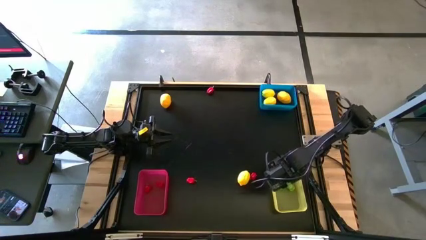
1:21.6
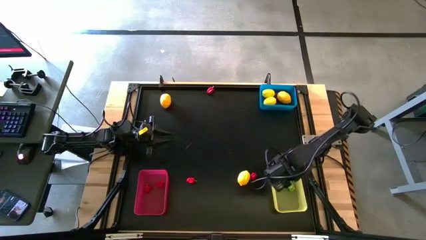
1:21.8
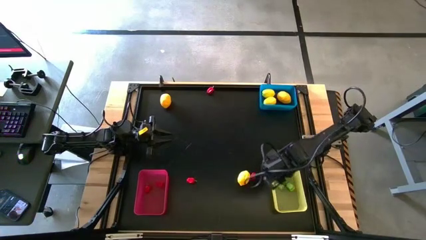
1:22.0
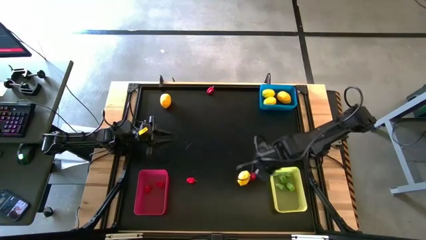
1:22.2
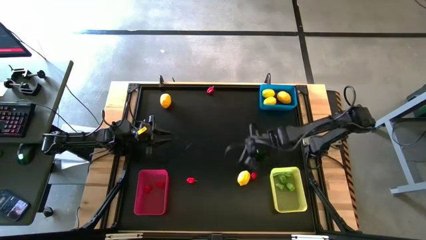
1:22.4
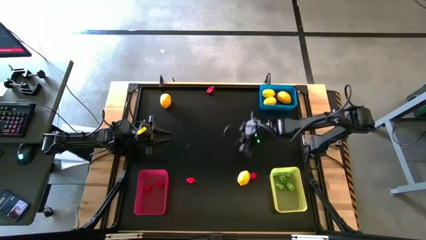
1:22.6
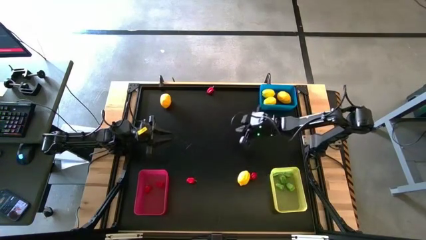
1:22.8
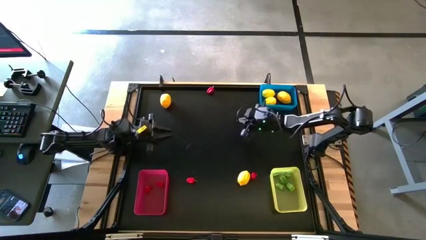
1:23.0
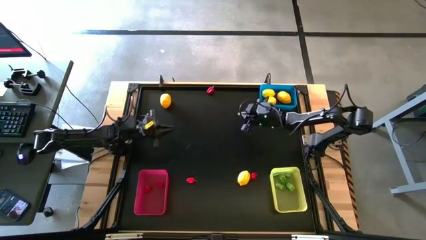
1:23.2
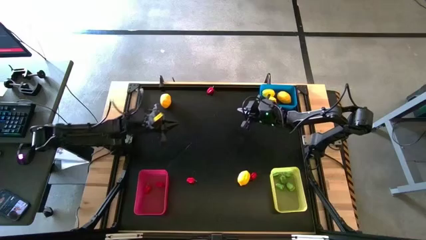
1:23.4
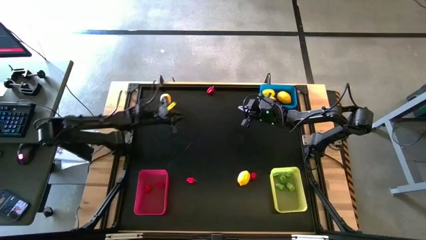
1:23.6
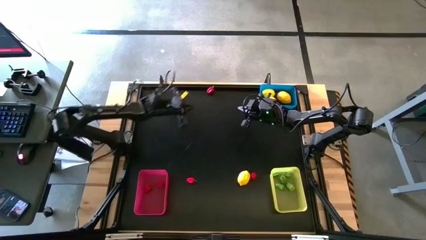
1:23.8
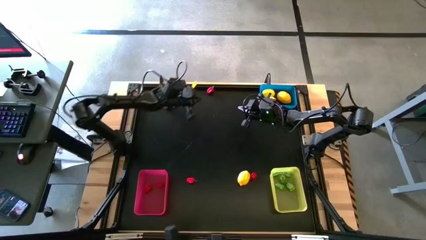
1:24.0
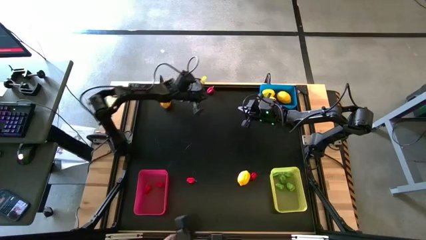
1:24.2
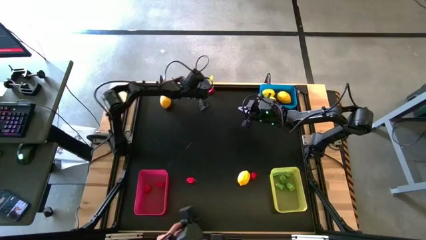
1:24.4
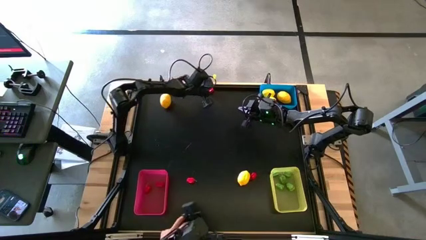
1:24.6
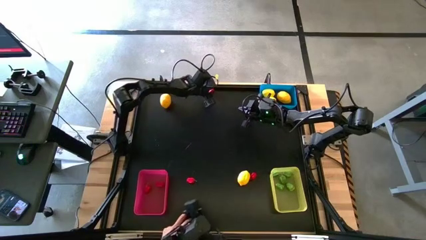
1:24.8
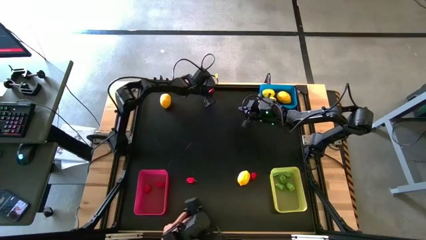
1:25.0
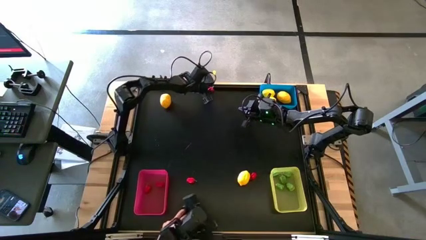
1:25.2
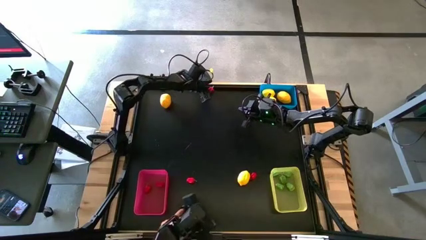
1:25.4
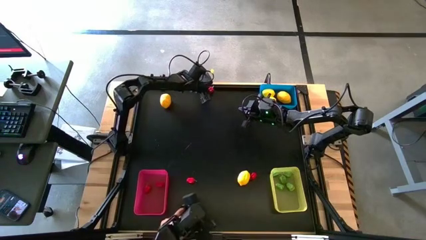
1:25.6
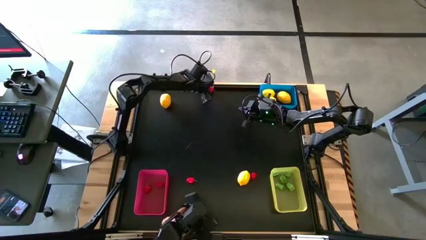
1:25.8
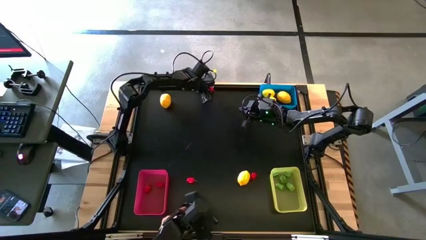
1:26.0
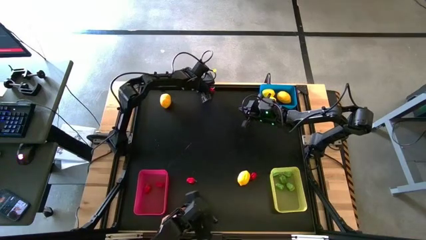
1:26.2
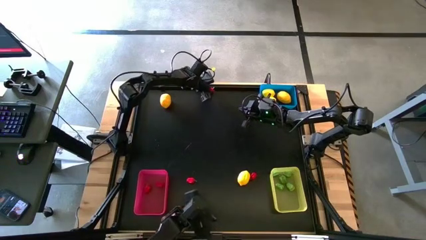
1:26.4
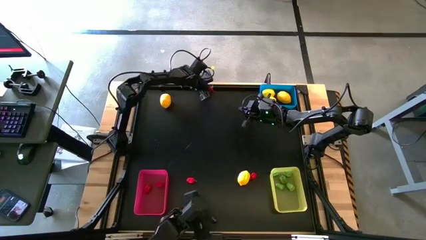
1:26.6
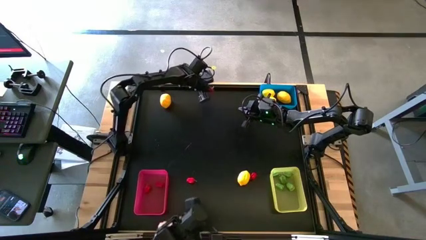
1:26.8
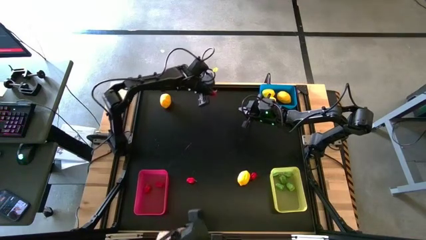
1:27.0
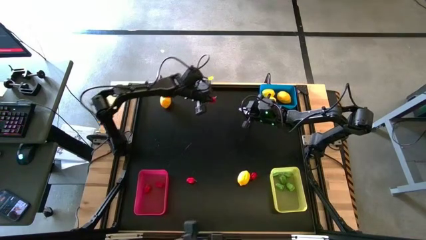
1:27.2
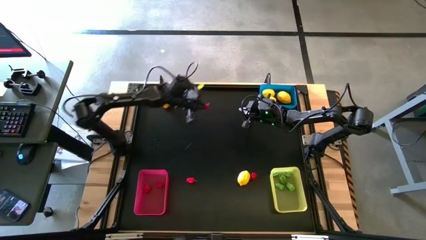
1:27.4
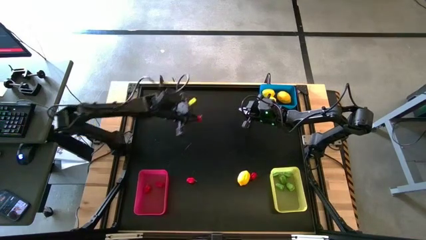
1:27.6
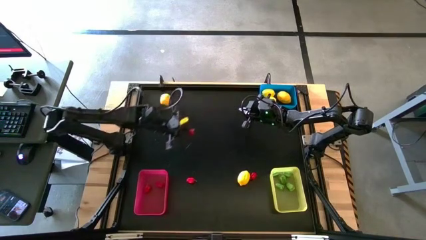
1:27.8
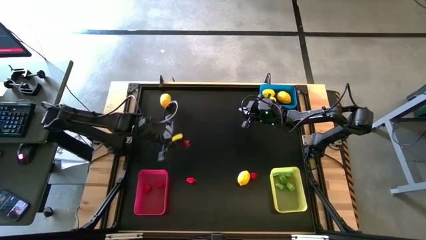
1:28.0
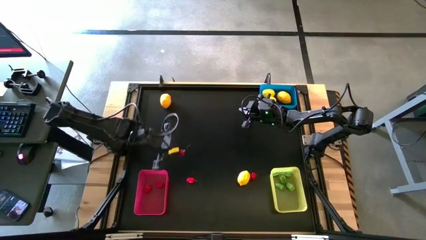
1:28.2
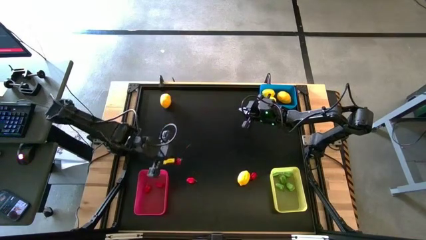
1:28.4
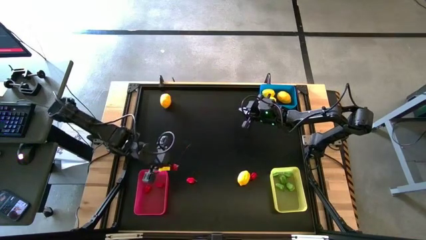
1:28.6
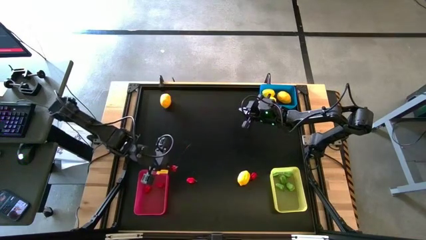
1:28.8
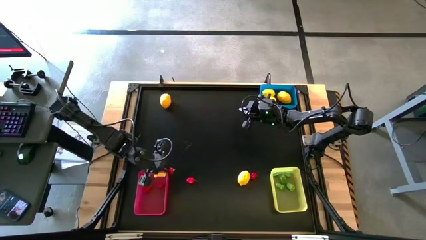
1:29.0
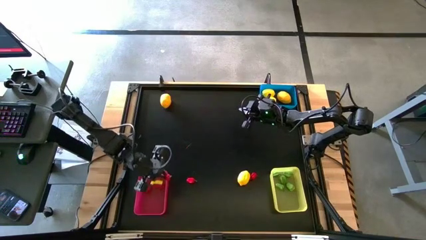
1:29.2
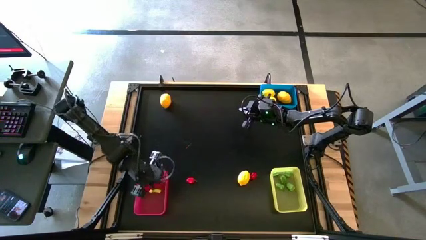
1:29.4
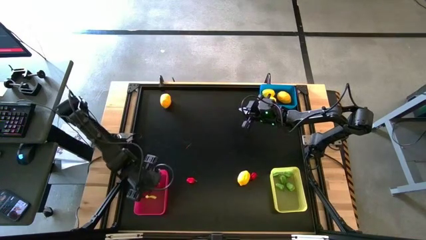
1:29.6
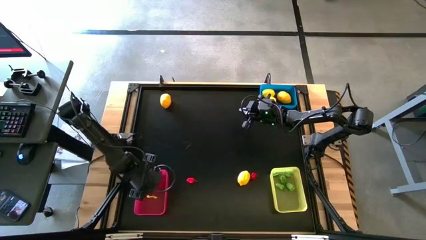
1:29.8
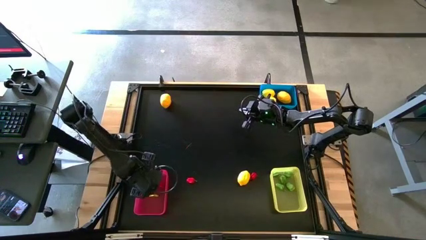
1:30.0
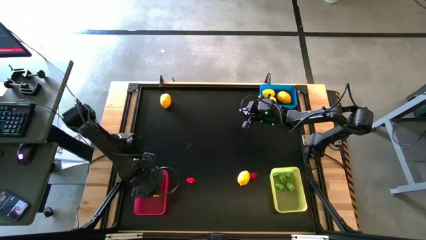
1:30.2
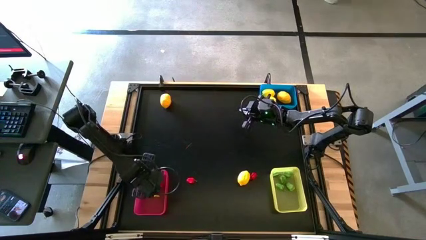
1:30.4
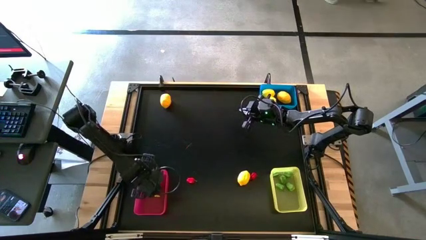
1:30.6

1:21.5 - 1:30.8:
Task: Sort produce into baskets
Put the red chili pepper into the red bin

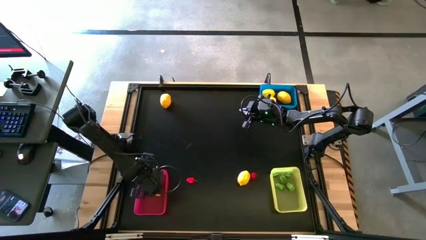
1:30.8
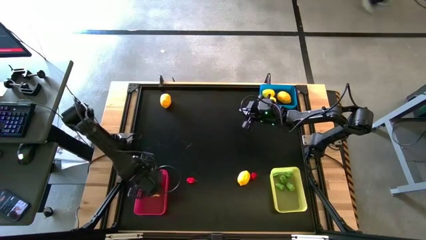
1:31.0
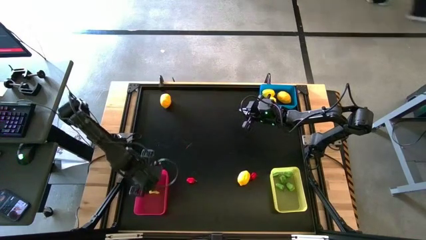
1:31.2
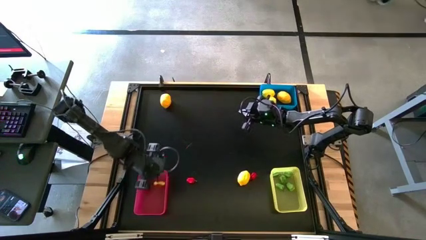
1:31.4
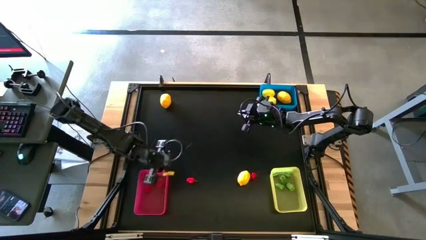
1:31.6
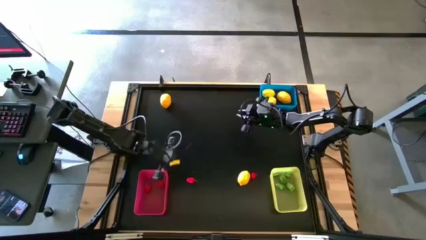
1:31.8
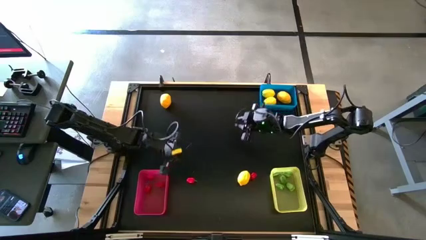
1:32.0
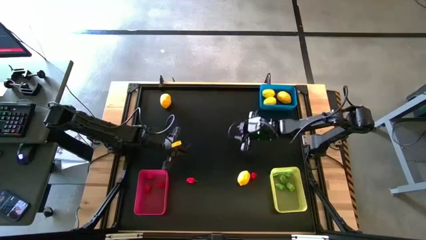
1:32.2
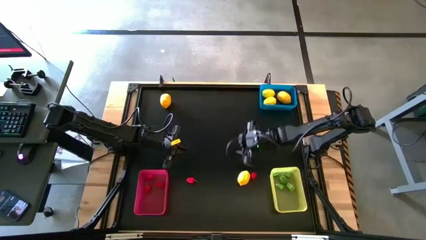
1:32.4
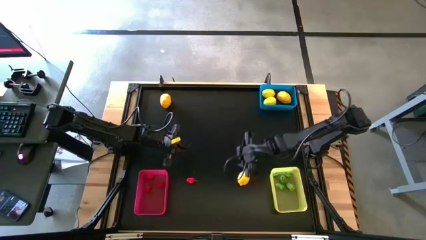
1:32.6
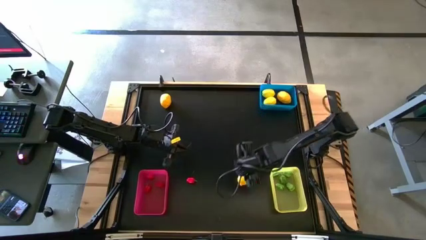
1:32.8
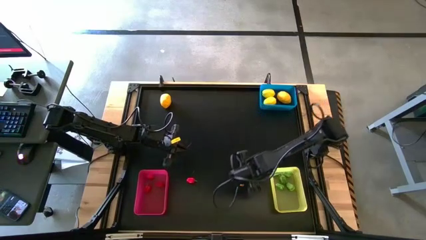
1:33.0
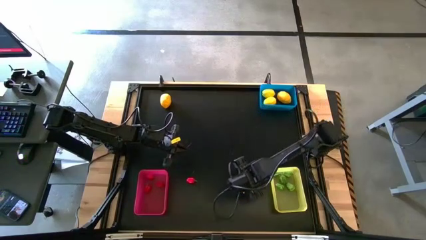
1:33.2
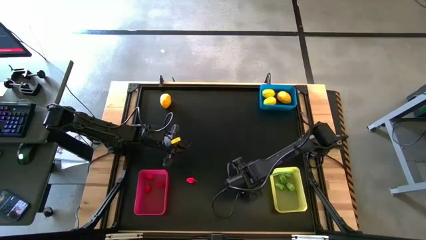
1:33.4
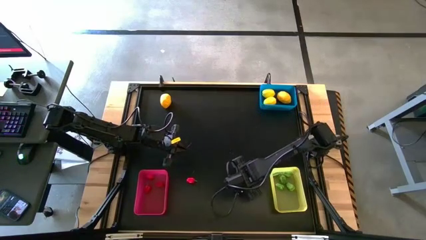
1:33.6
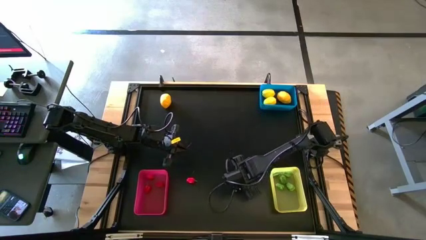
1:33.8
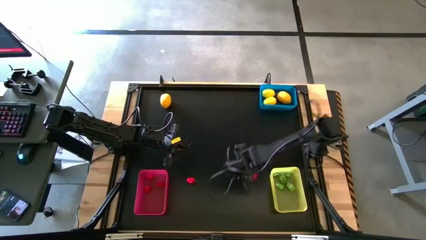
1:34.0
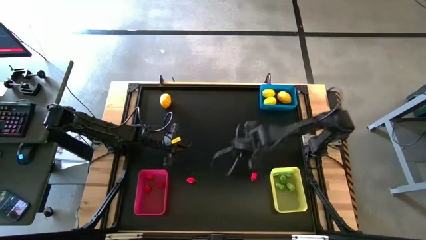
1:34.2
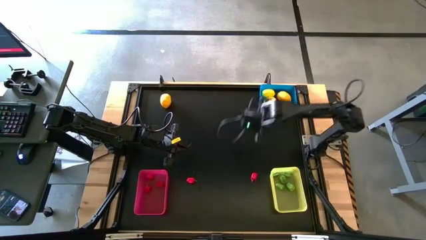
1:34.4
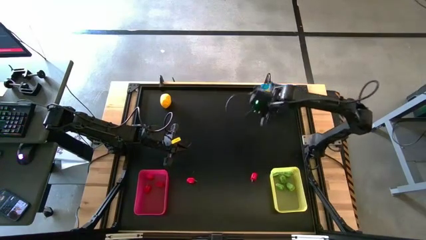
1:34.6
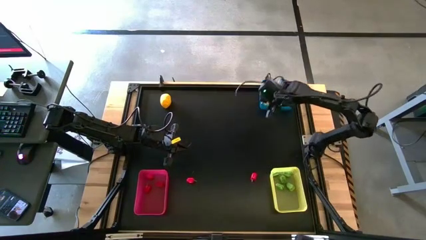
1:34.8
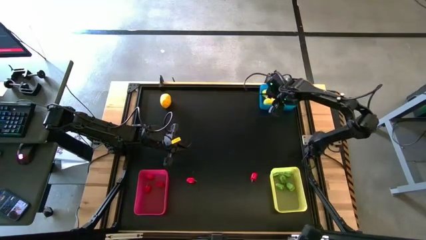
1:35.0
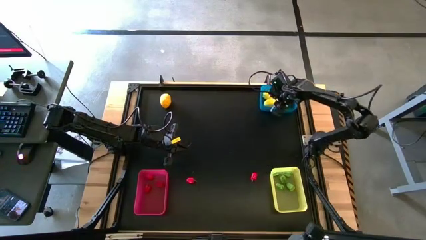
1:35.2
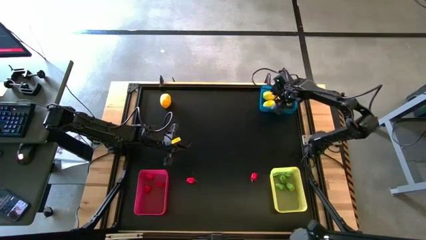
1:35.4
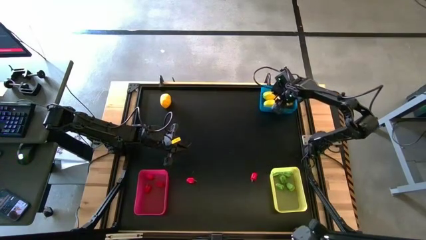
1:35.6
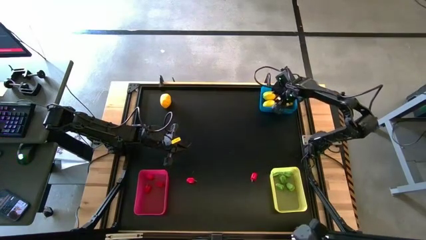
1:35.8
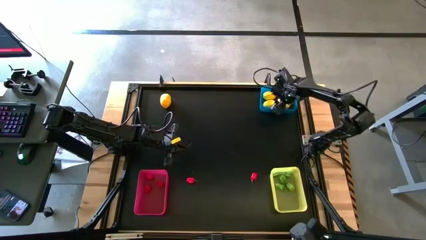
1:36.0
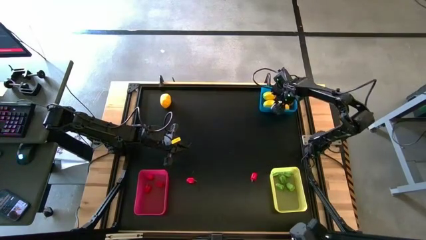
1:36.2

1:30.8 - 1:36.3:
Put the yellow lemon into the blue bin
